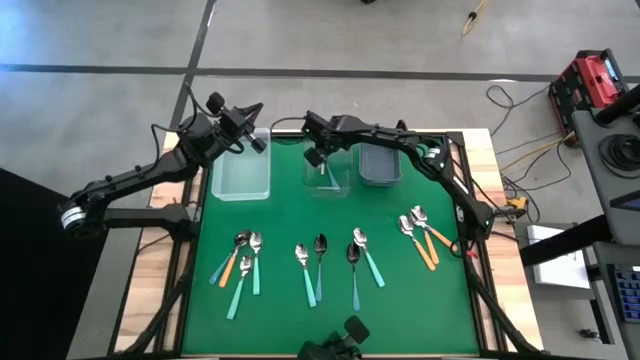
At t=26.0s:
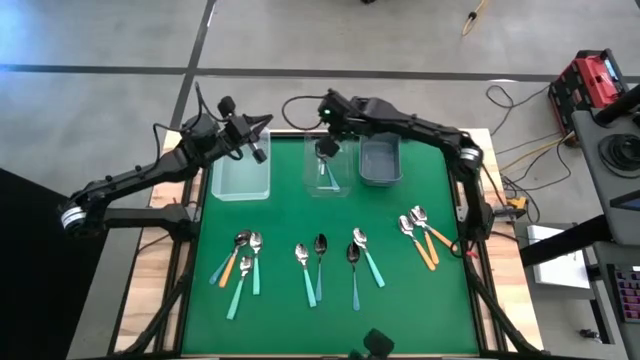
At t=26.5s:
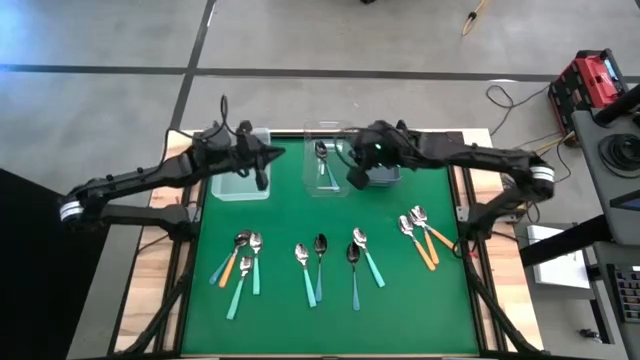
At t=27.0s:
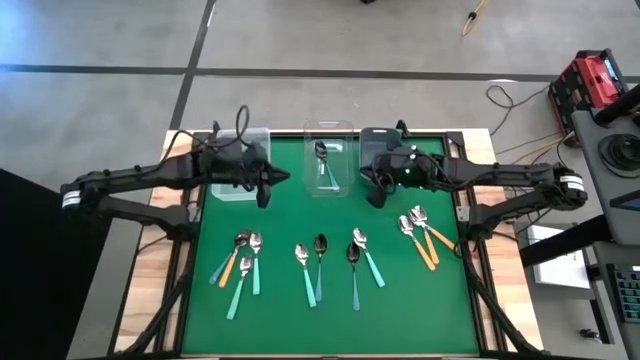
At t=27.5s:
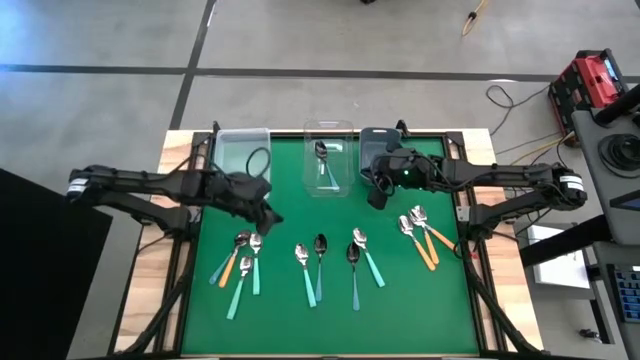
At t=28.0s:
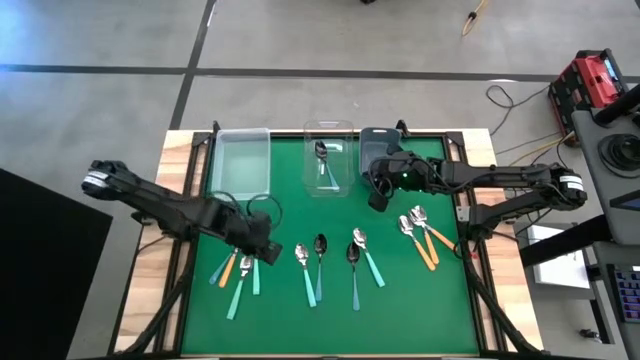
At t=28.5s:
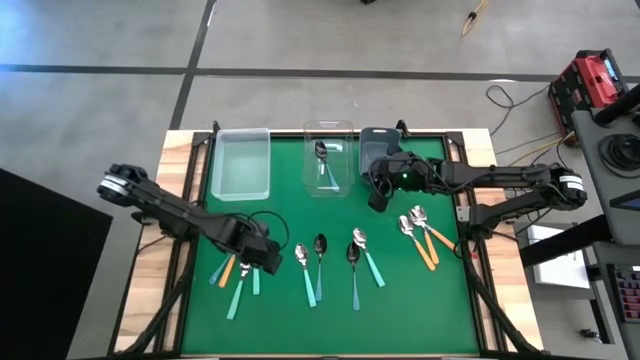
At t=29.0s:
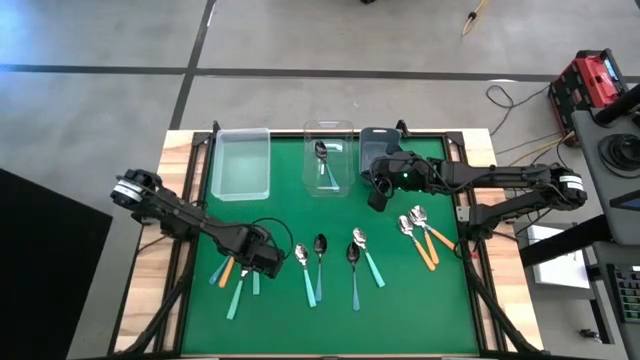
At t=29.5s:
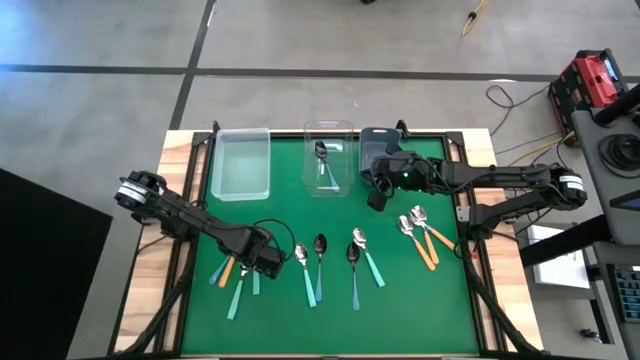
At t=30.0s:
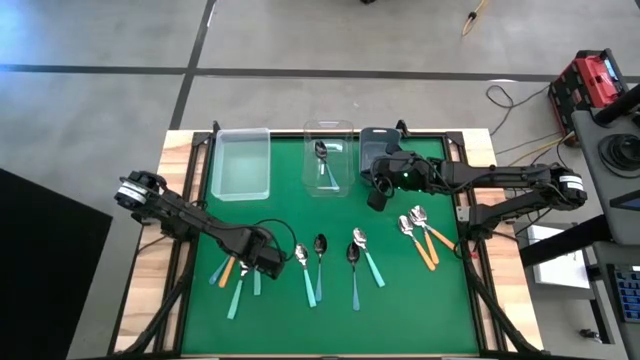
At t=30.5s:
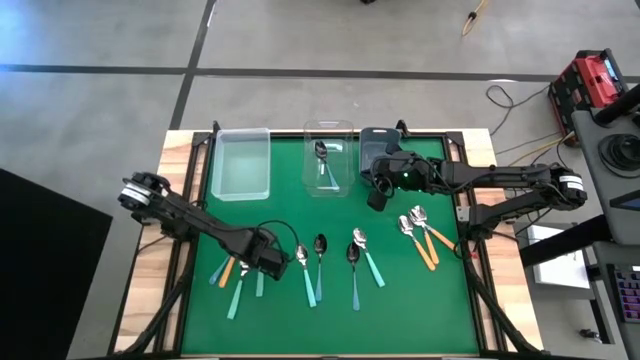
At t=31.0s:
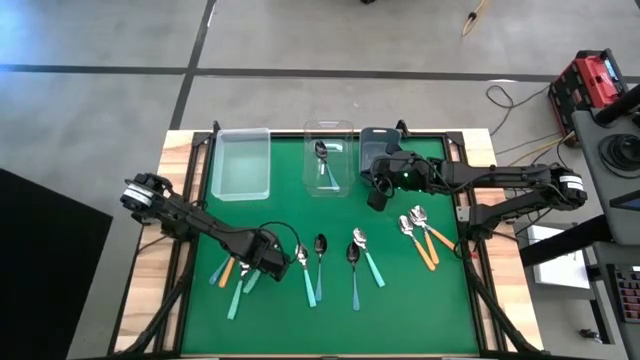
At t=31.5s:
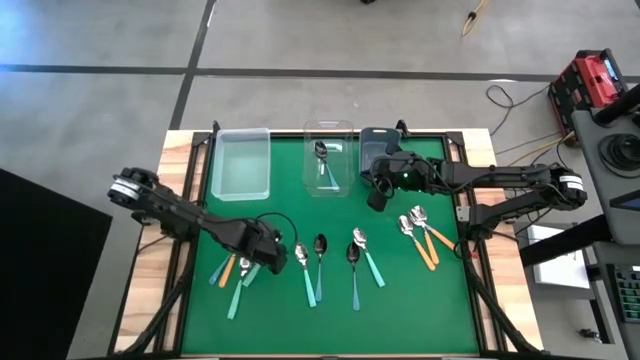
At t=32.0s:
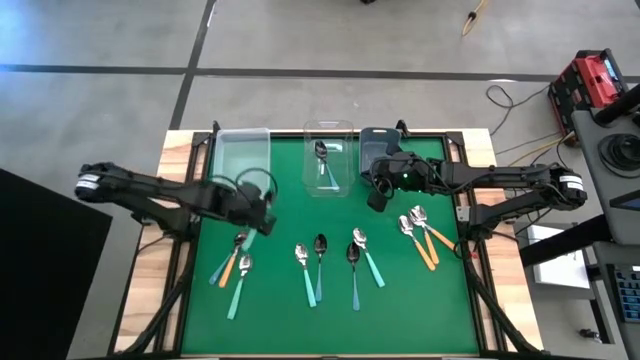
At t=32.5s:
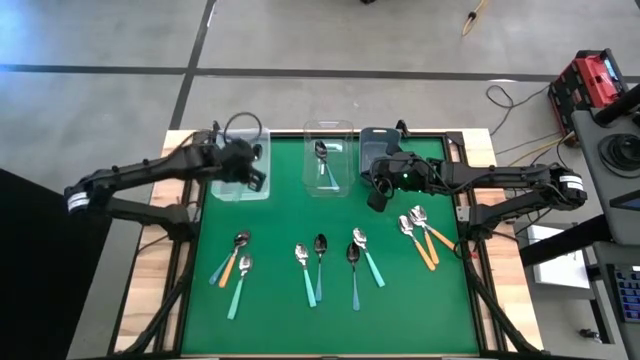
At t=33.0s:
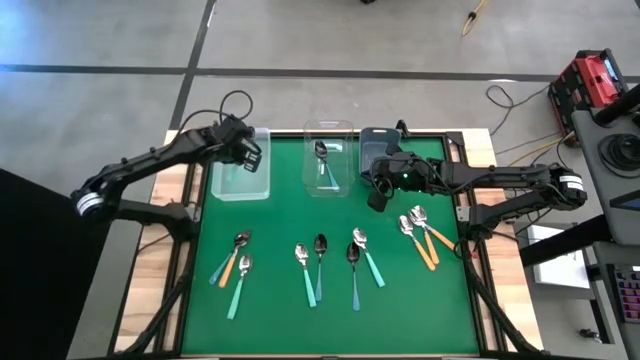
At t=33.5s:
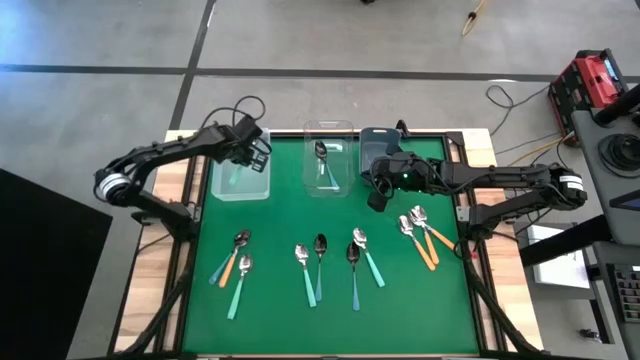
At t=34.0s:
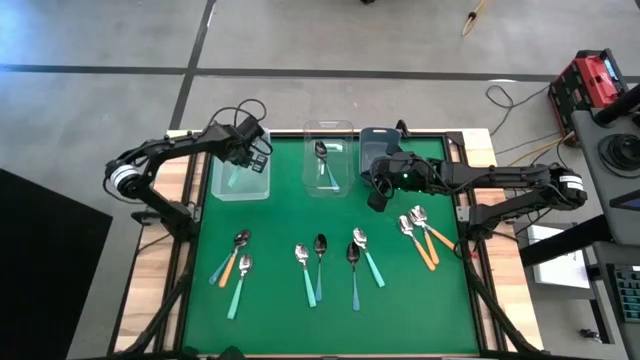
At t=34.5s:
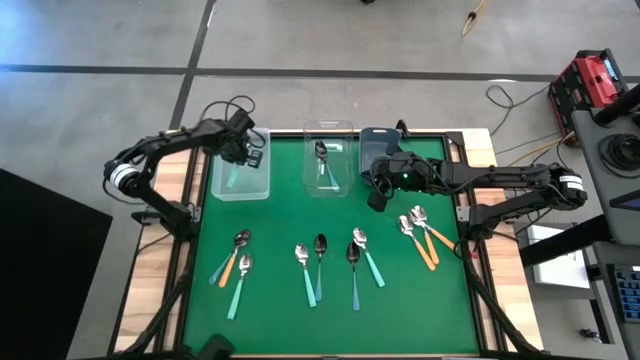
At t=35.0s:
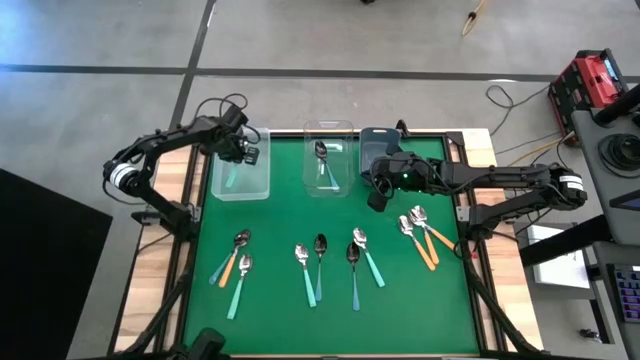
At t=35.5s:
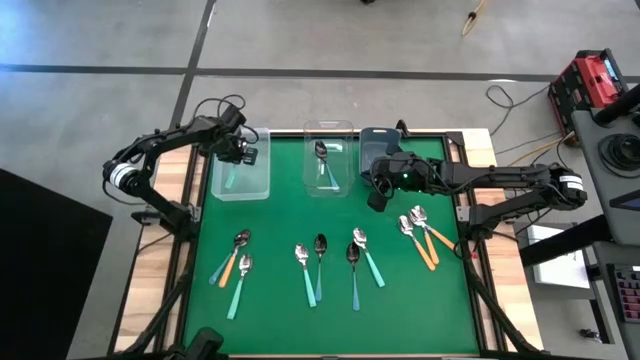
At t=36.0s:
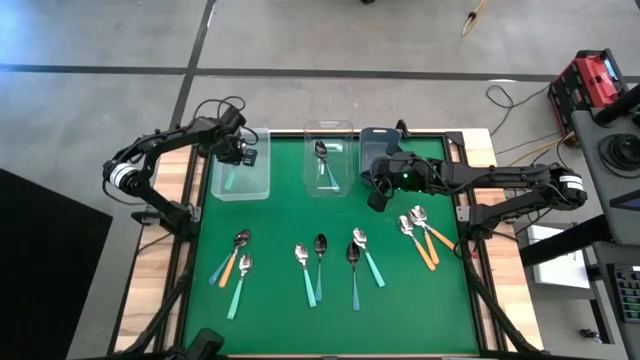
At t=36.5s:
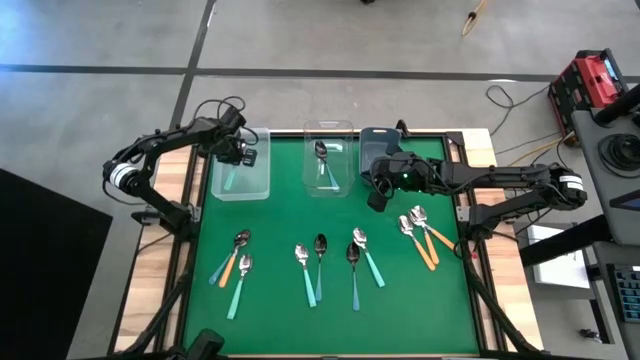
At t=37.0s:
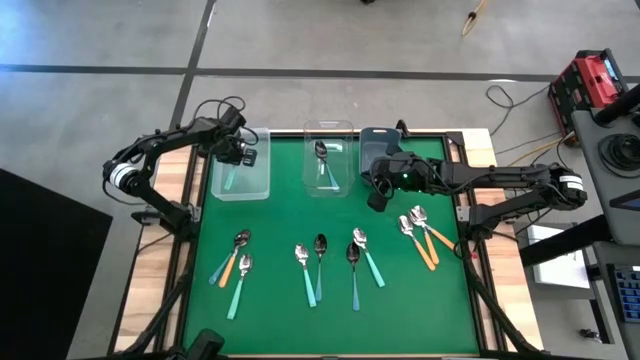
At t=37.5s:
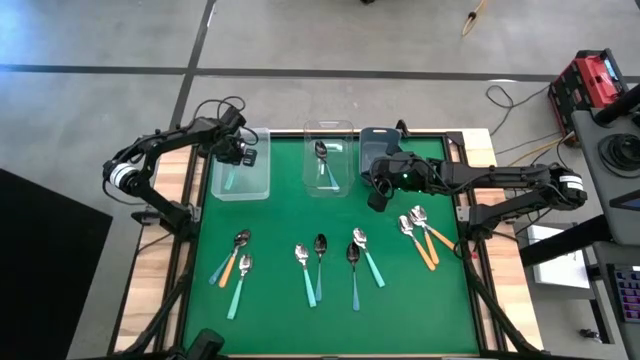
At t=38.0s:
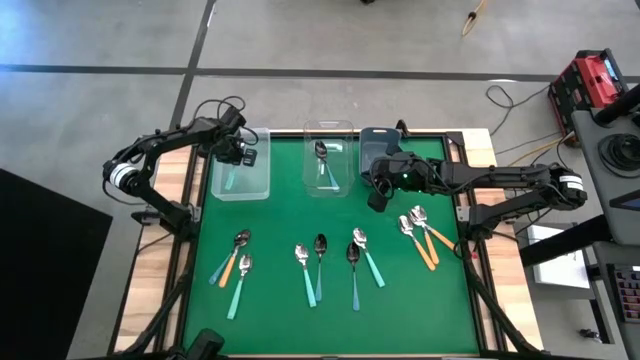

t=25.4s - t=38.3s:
Task: Sort silverware by color (type)
Put the green spoon into the white bin

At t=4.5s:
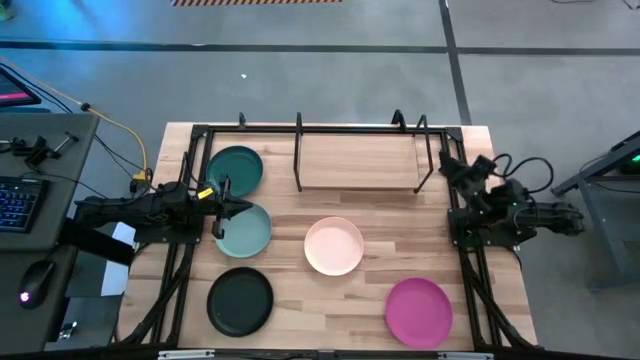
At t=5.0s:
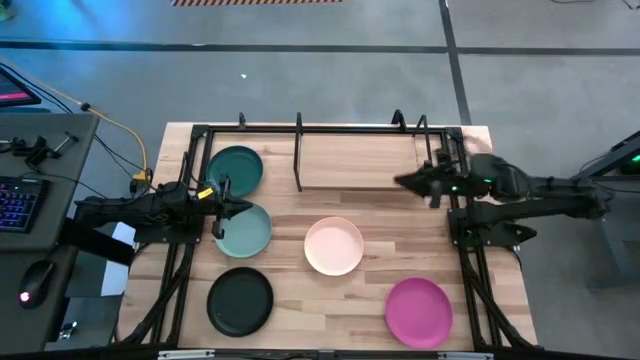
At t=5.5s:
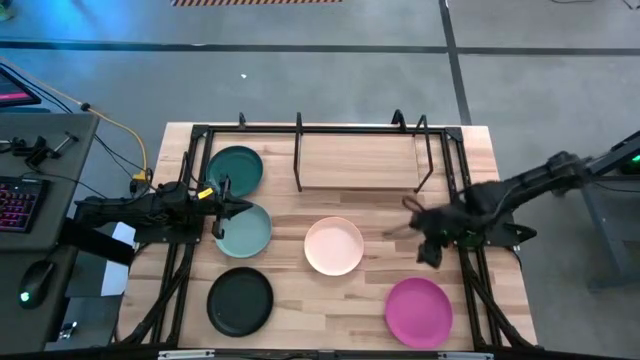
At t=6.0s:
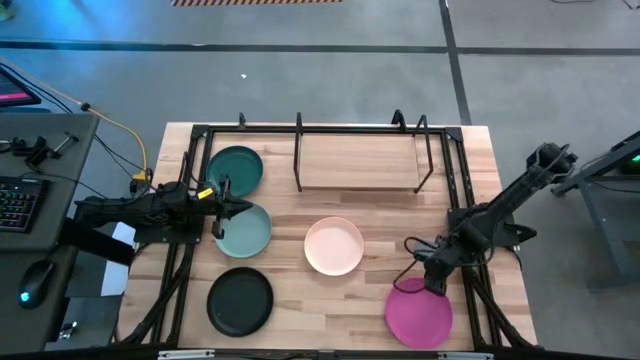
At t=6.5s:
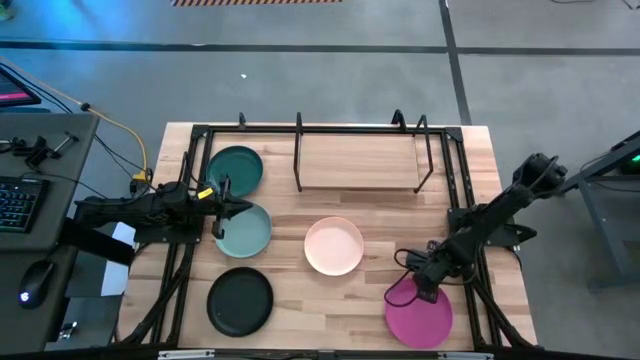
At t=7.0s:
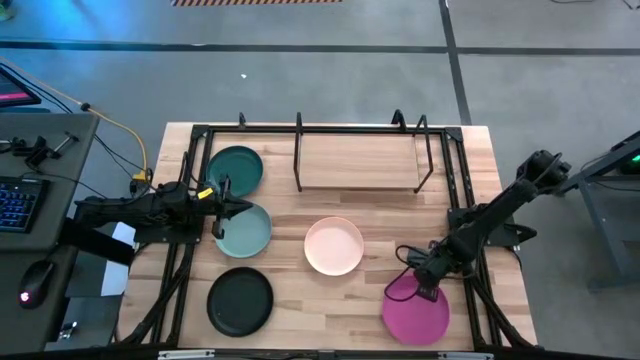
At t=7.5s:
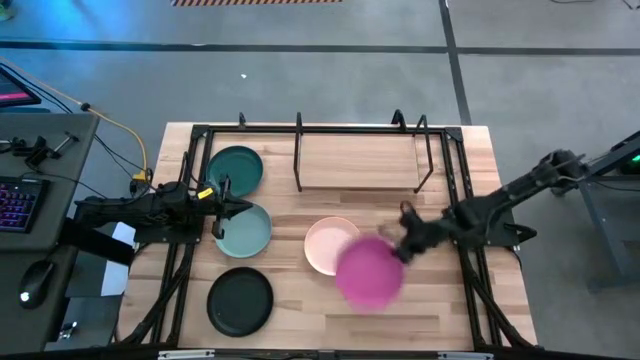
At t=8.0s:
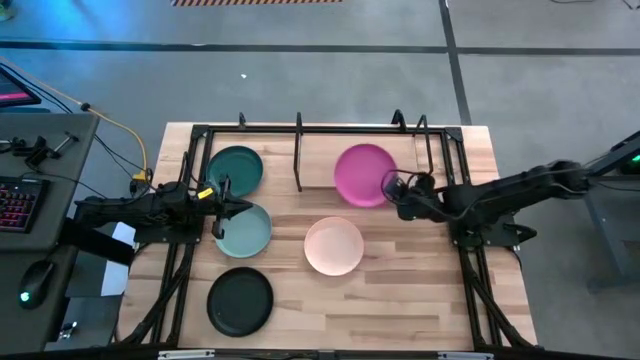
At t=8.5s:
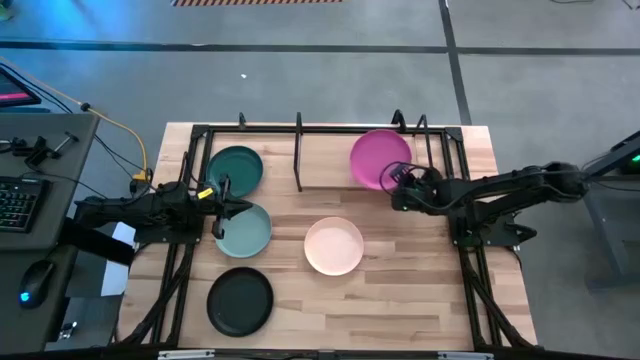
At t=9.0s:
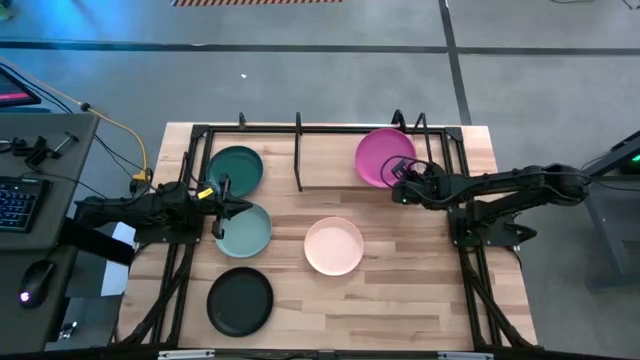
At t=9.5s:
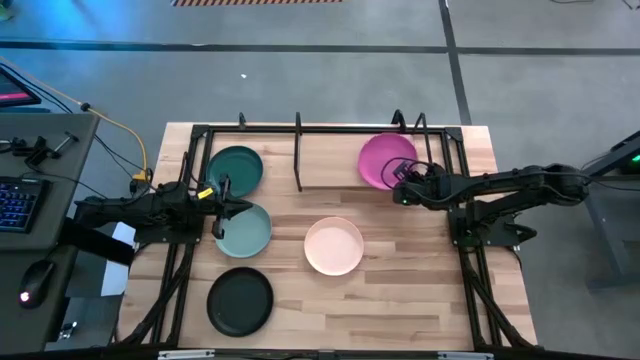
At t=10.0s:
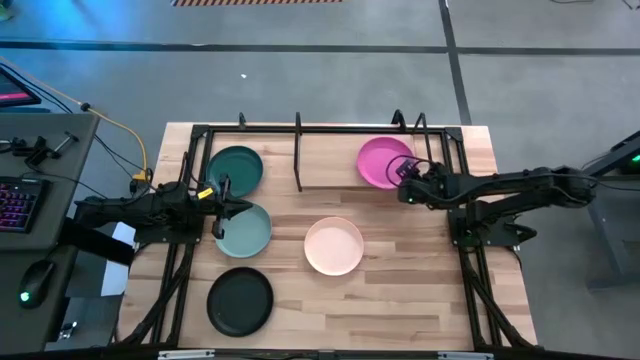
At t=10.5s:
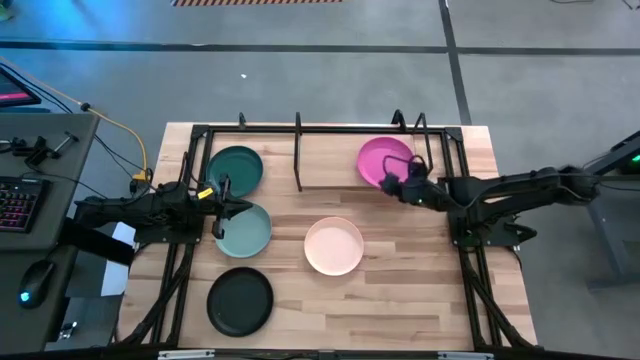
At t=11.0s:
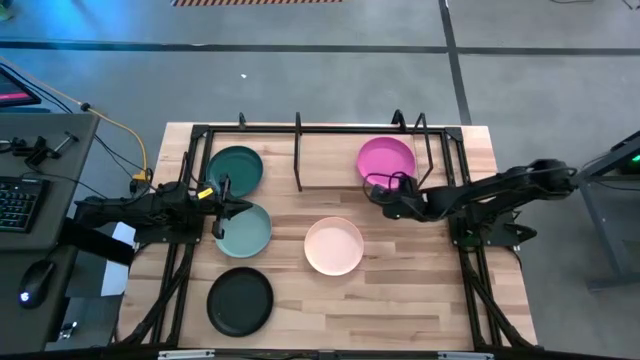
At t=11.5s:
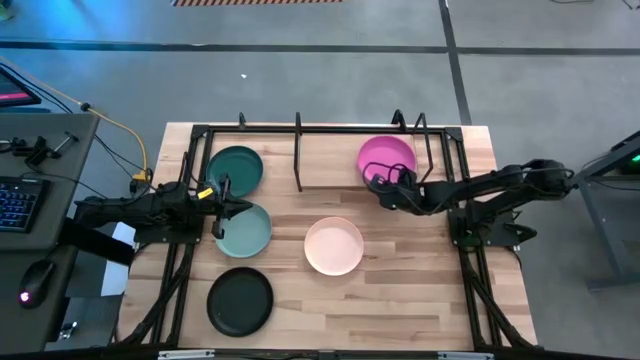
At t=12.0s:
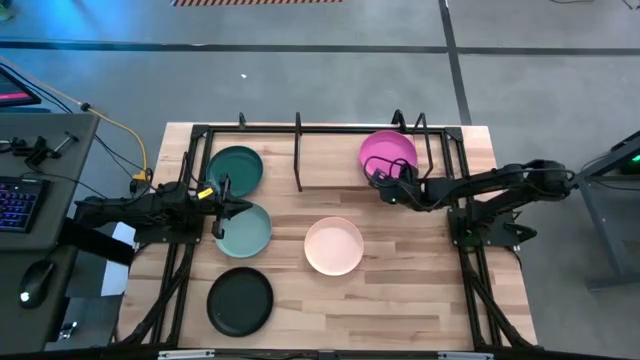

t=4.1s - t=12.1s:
Task: Place and stack plates onto a shelf
Put the pink plate on the shelf
